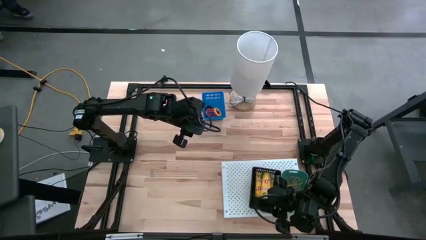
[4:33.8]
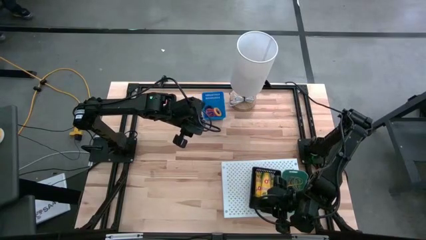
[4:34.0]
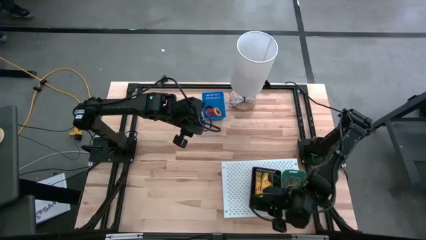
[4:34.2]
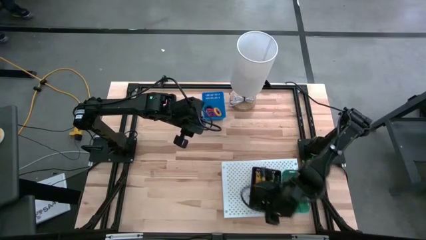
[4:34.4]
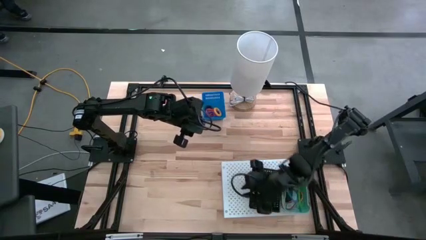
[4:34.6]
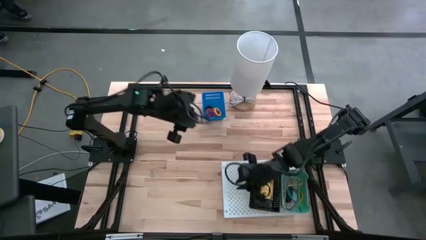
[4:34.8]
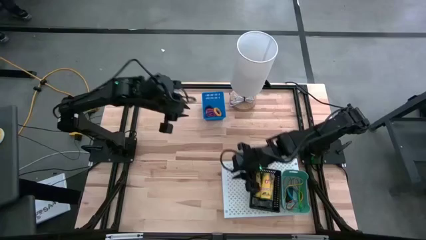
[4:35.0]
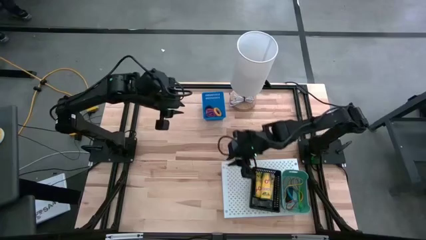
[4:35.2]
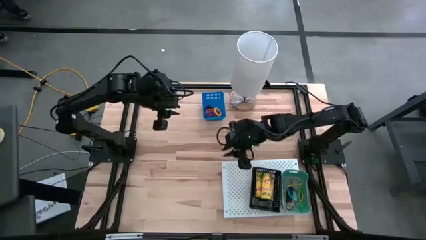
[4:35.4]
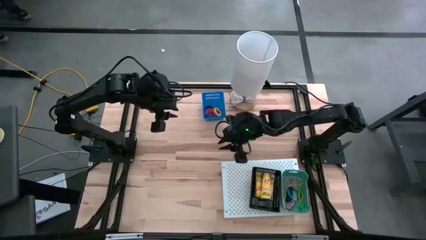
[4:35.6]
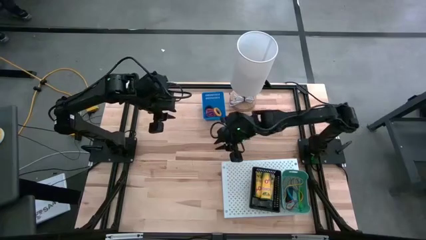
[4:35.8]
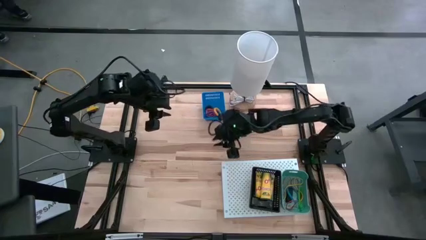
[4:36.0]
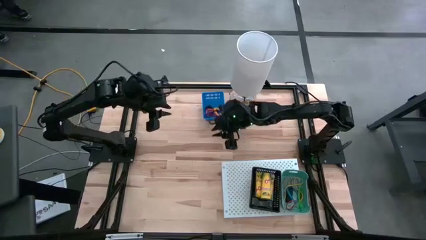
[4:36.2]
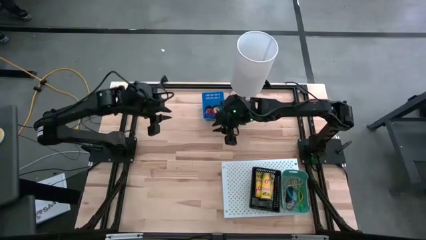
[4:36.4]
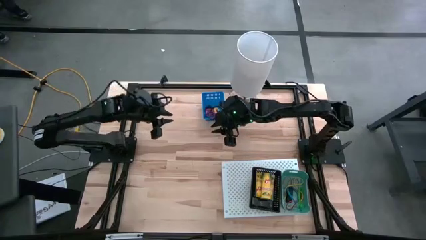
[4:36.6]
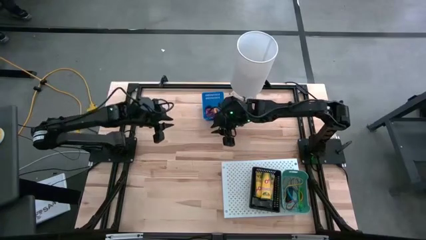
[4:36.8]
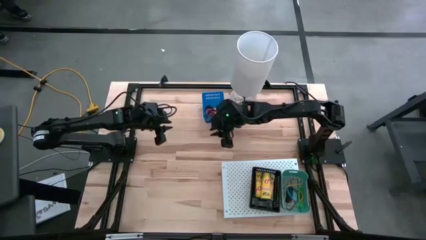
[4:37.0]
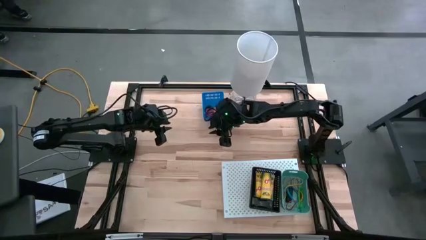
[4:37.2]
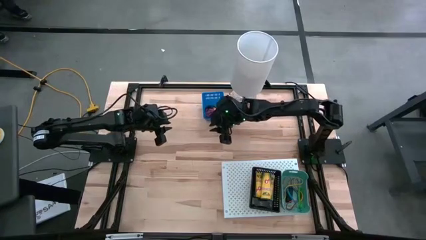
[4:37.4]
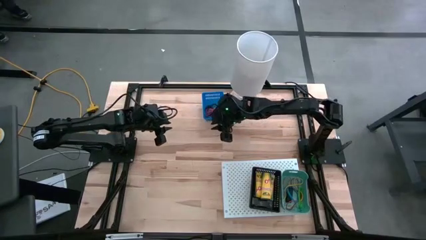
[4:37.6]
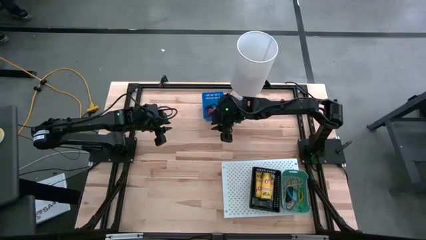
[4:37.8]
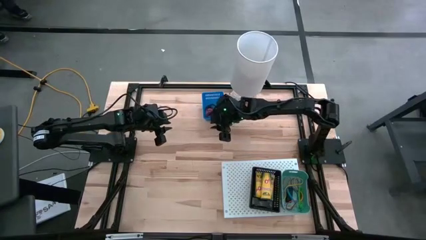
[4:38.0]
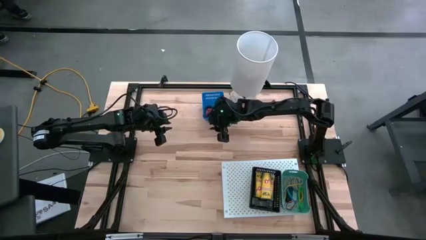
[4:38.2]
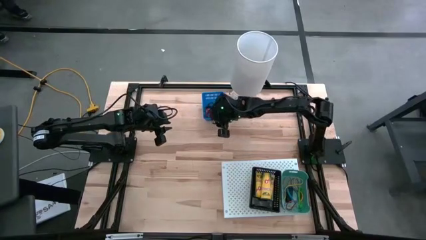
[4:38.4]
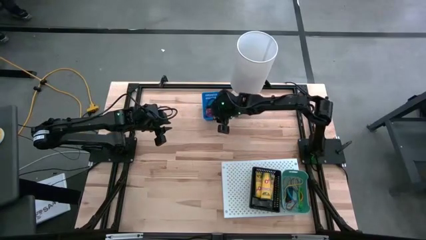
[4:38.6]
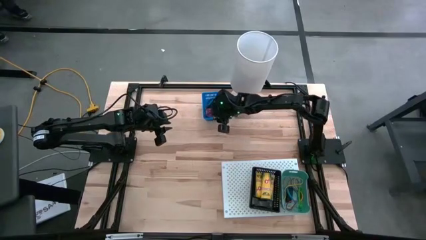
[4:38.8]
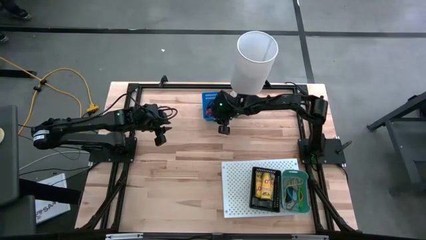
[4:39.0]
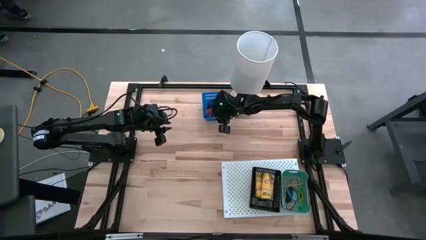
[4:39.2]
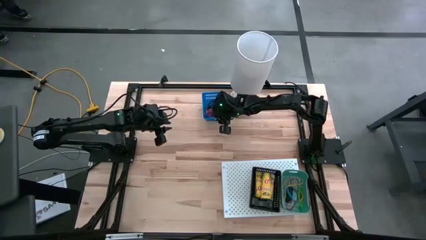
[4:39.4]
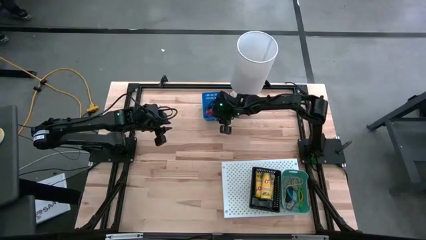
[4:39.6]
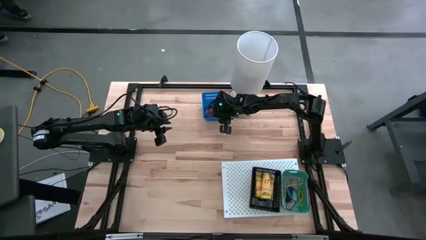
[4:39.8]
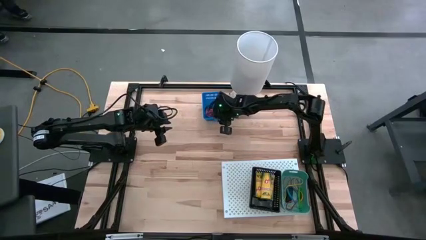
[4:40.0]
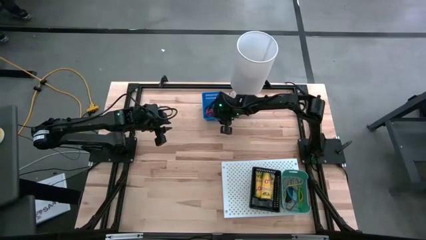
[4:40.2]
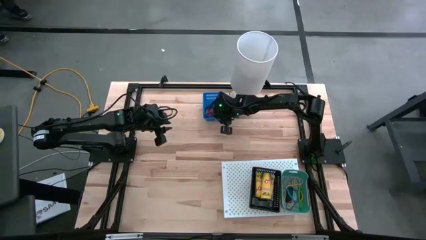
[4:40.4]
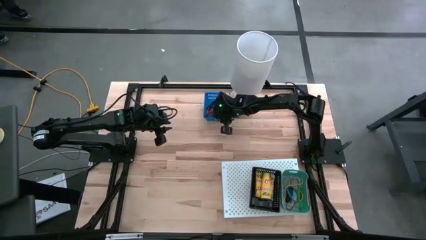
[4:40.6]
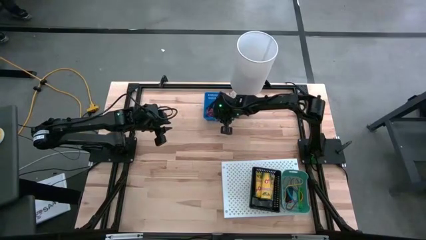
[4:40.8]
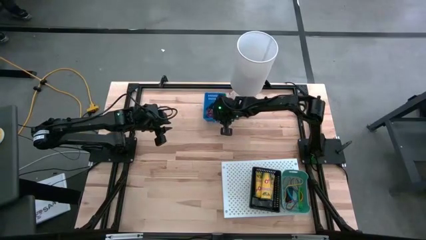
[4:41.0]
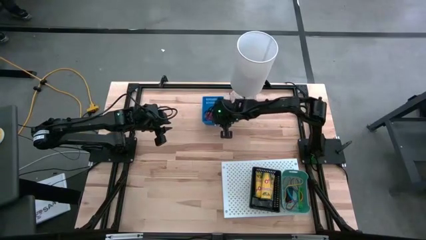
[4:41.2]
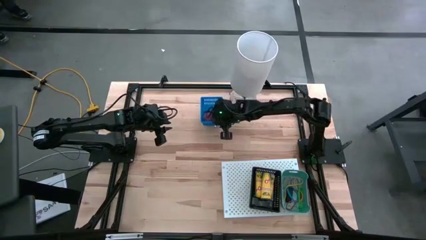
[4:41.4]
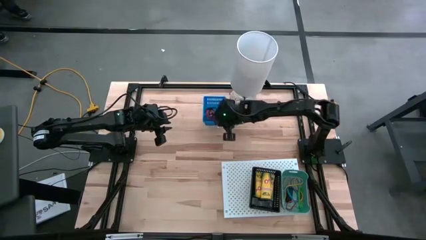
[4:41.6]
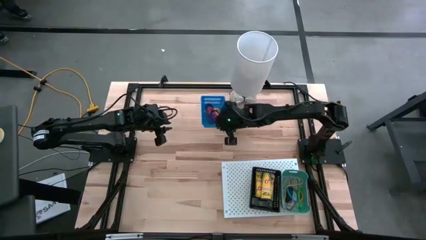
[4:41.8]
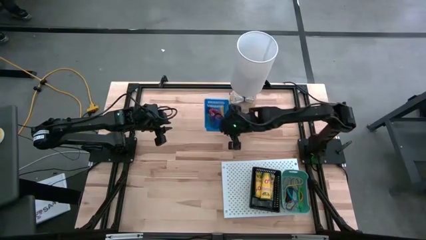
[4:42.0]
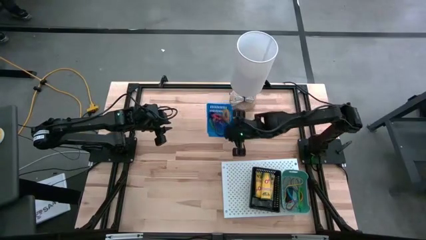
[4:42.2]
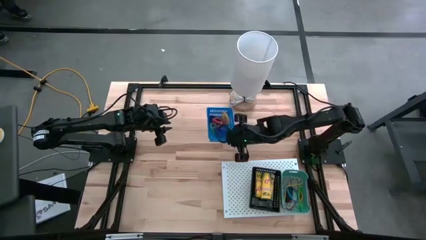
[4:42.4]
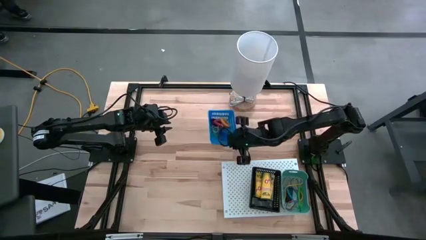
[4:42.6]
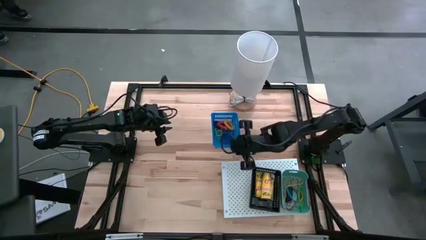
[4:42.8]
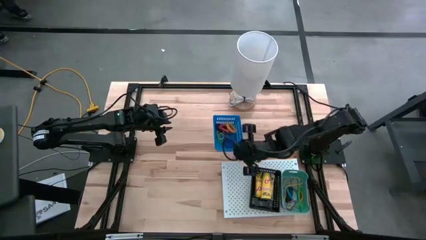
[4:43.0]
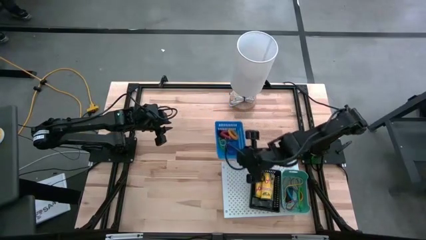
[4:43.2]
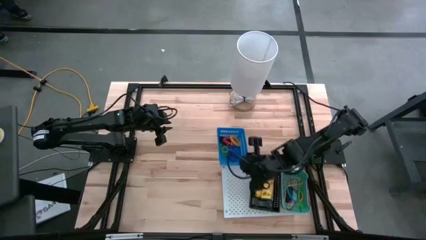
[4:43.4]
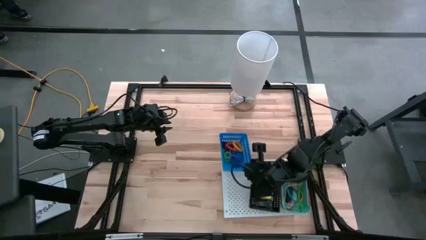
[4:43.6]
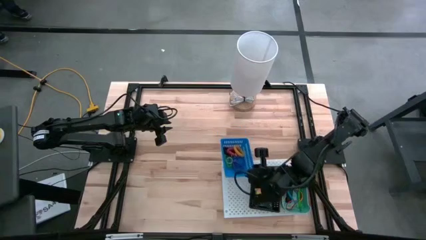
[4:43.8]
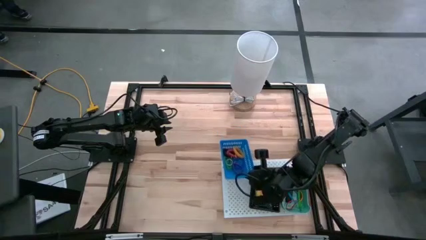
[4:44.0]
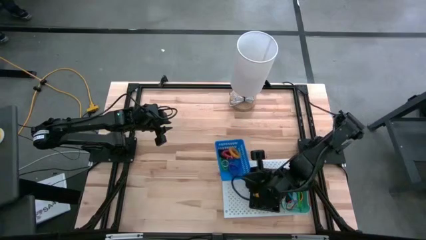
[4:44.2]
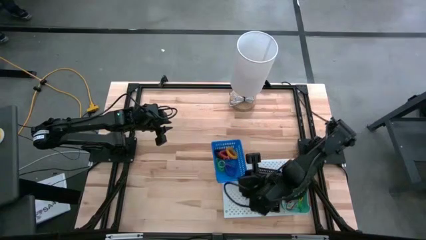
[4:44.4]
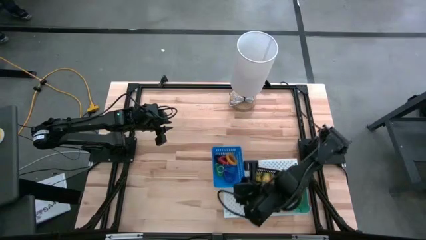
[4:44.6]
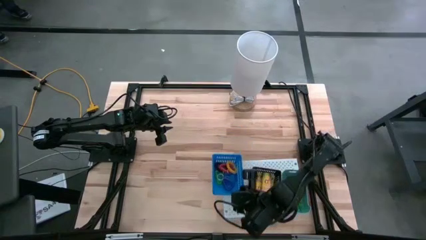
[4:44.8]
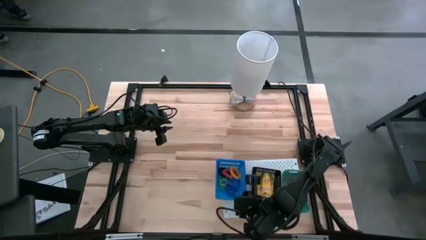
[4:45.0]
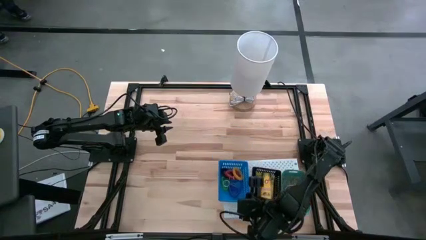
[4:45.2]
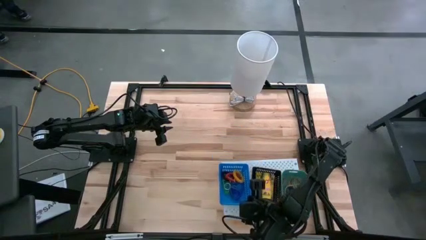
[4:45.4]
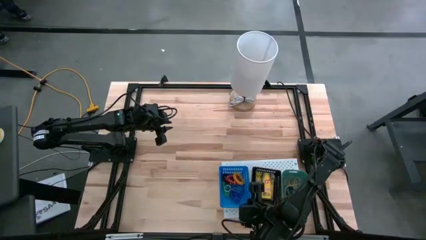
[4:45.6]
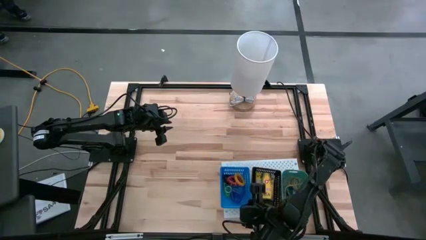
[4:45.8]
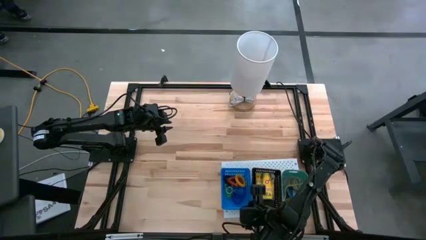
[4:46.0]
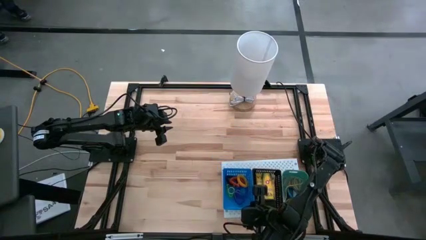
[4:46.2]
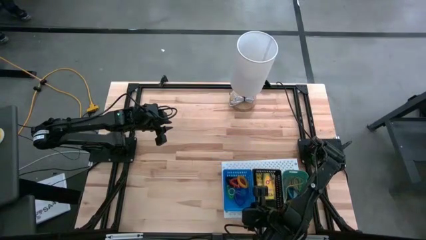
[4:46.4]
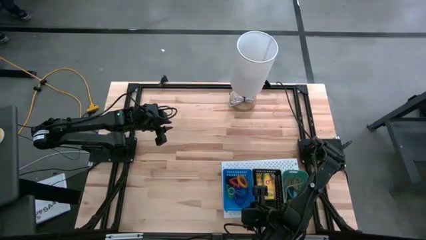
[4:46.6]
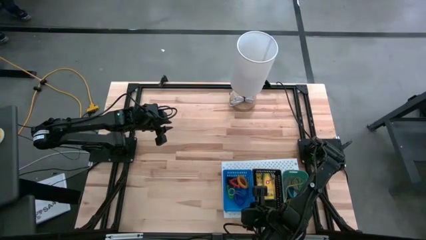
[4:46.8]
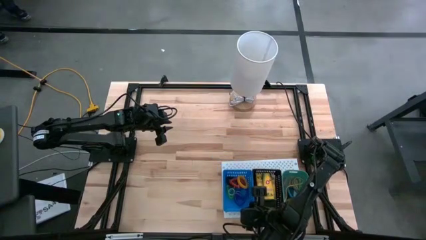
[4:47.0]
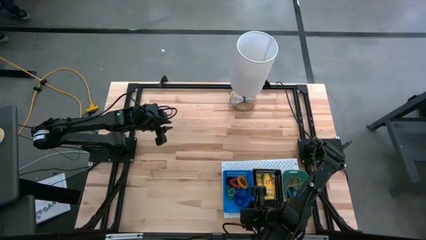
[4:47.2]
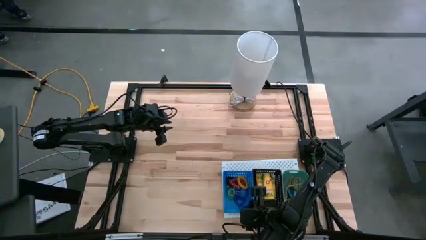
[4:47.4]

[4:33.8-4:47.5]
Task: Pick & Place Office Desk Supplies
Put the blue bin with the spring keychains on the shelf
